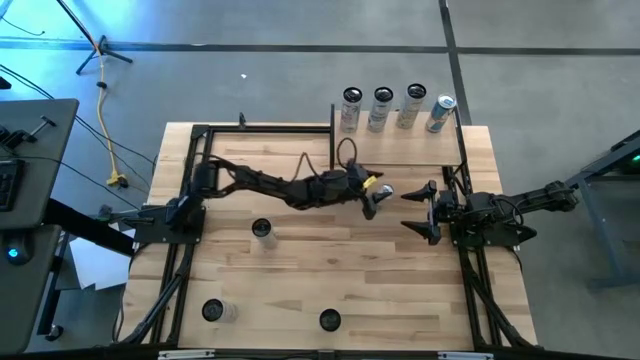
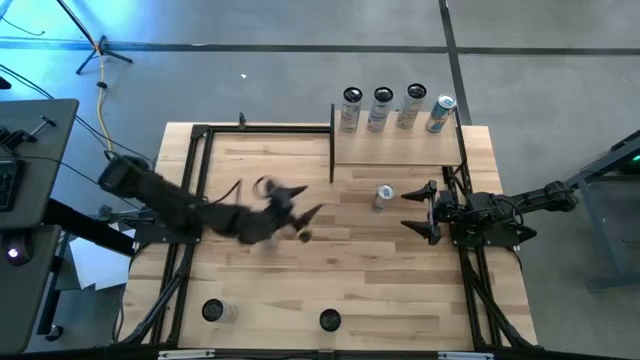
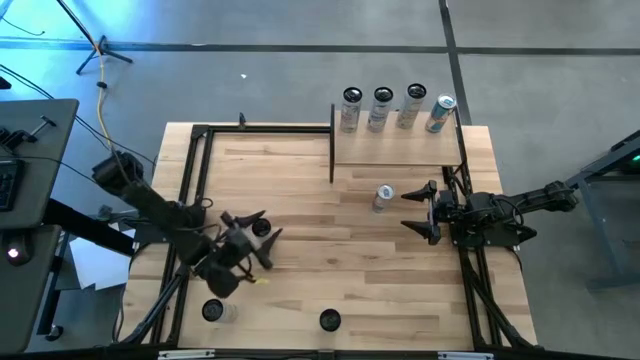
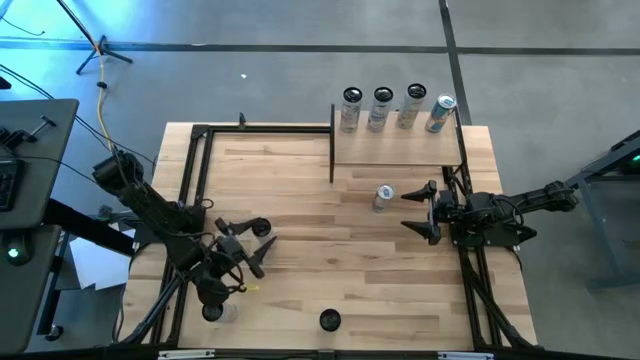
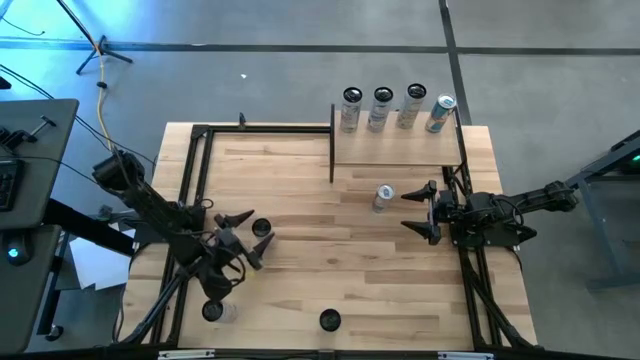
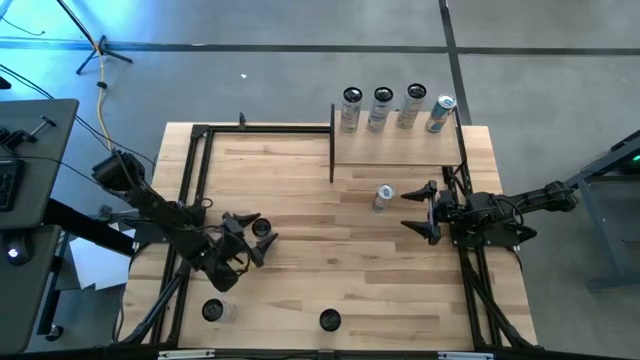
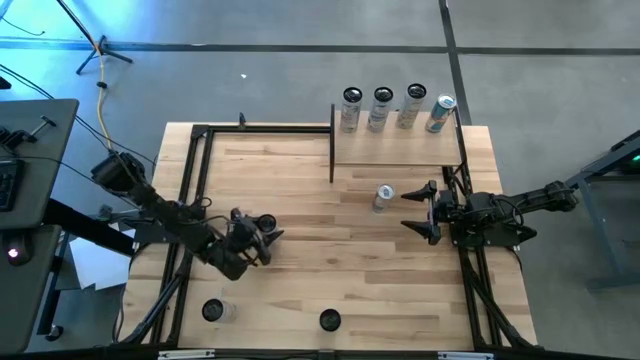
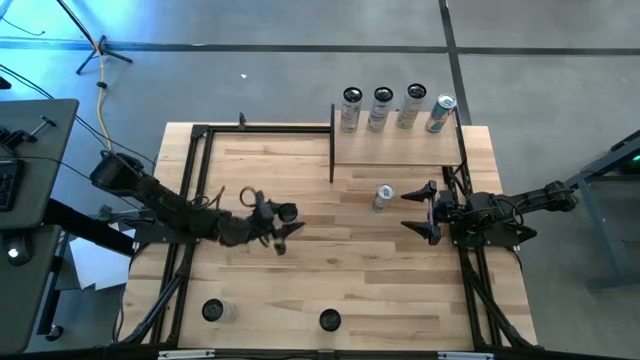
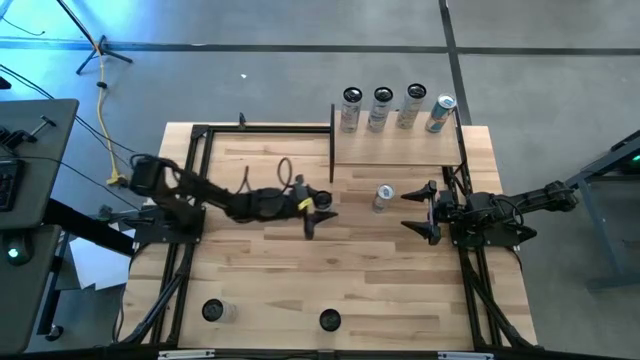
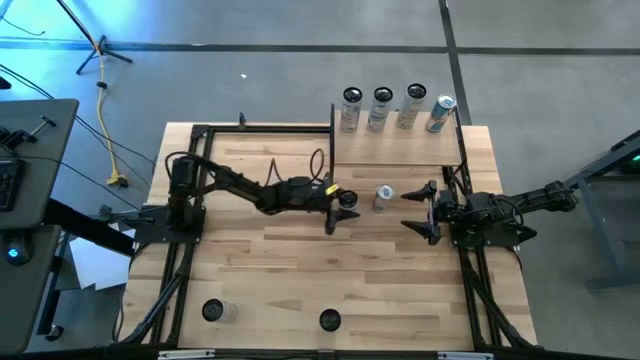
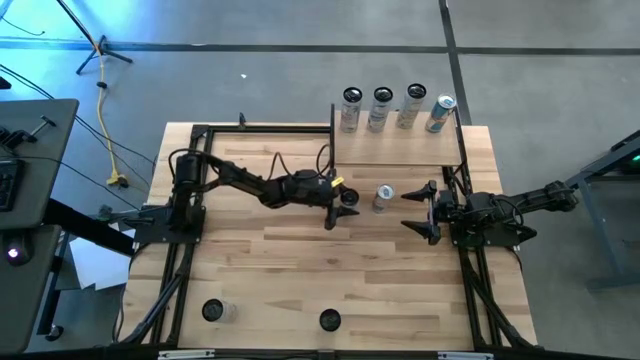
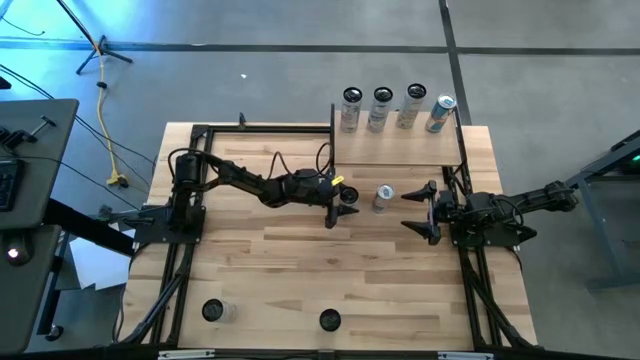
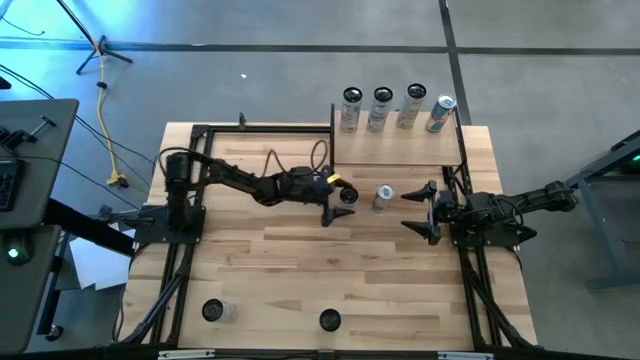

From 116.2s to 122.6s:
Task: Place canned beverage on shelf
Move the white yellow soda can to the center of the table

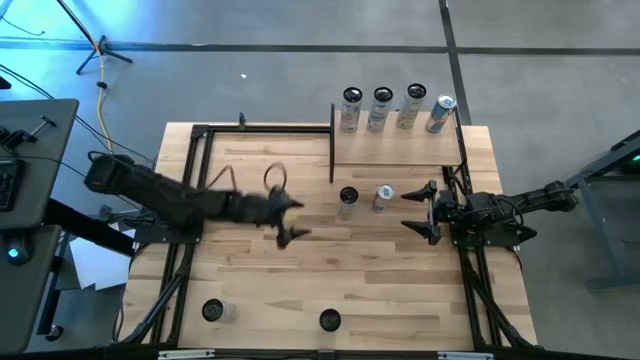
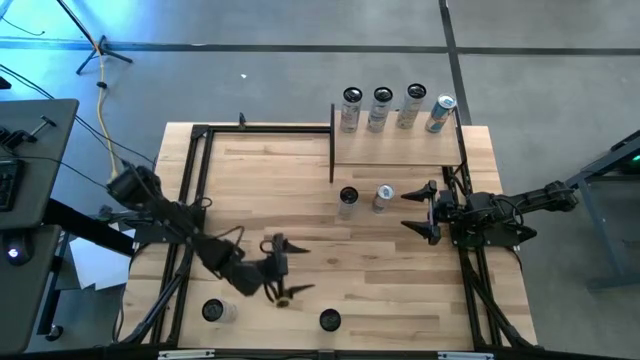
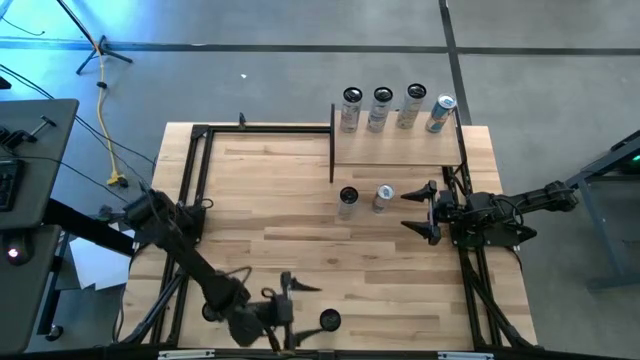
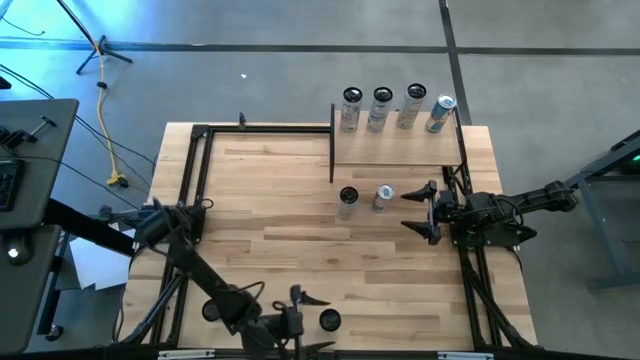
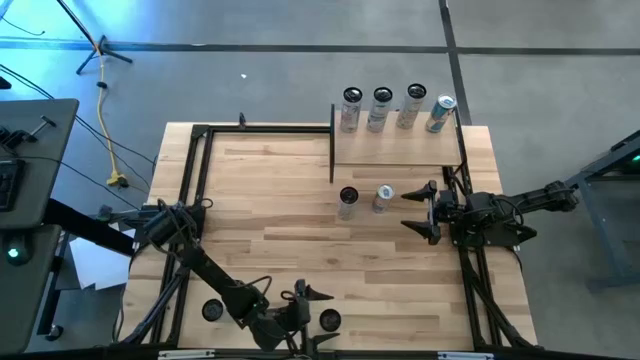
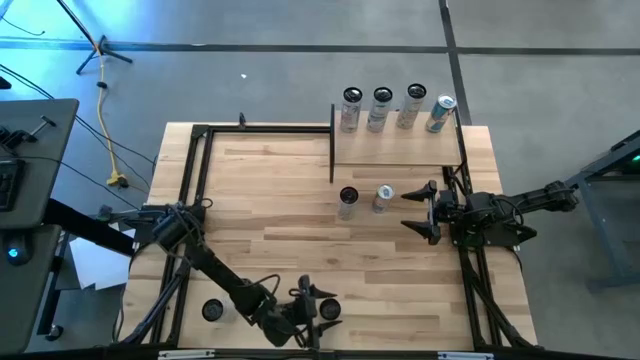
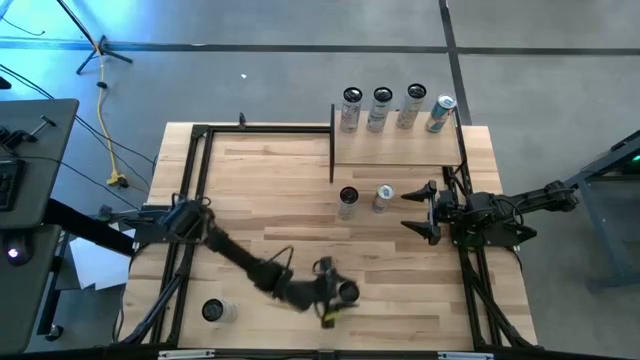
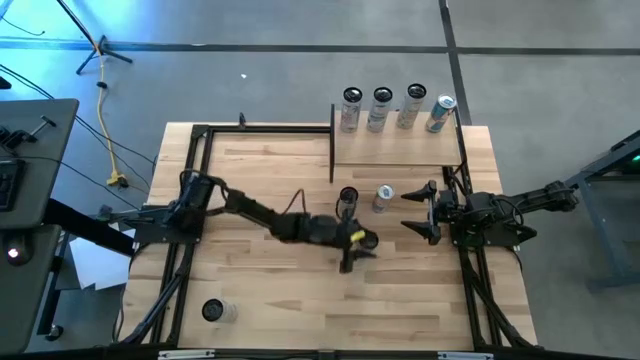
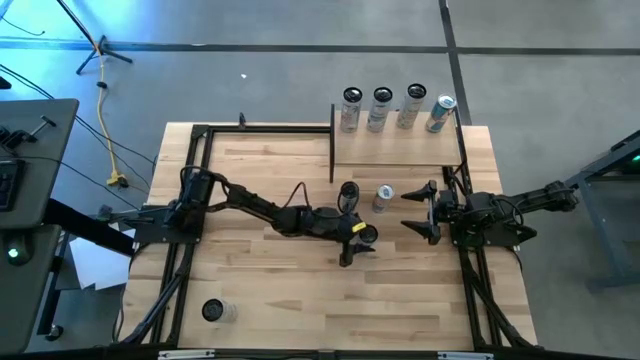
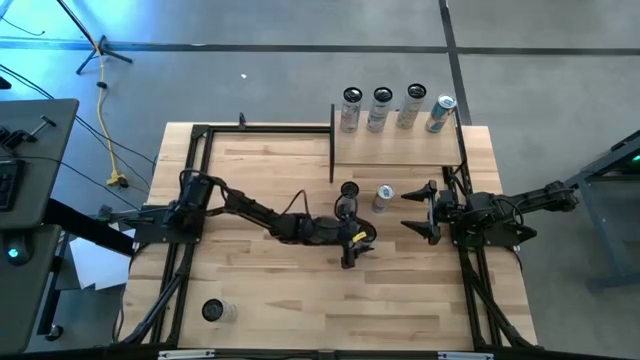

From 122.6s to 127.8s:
Move the white blue soda can to the center of the table

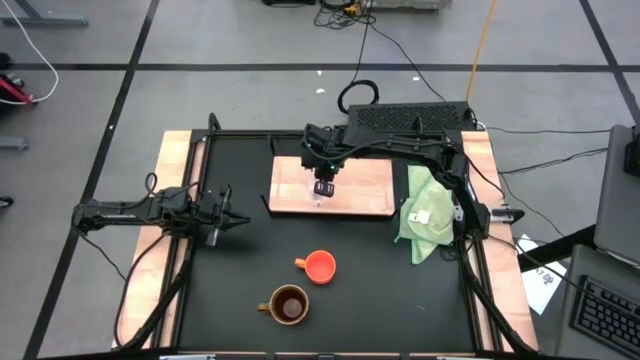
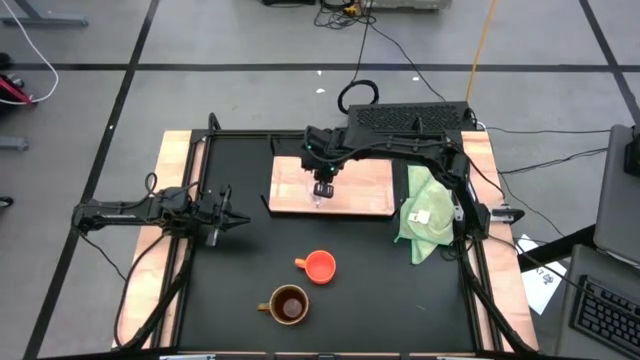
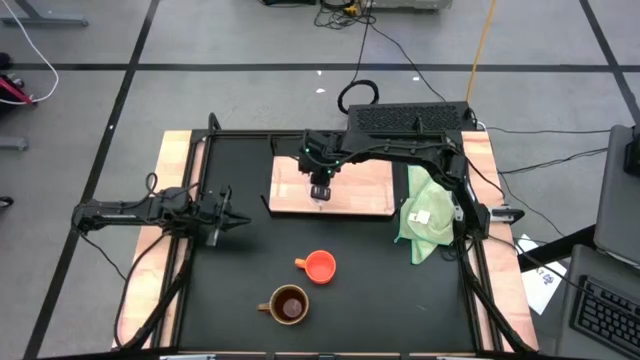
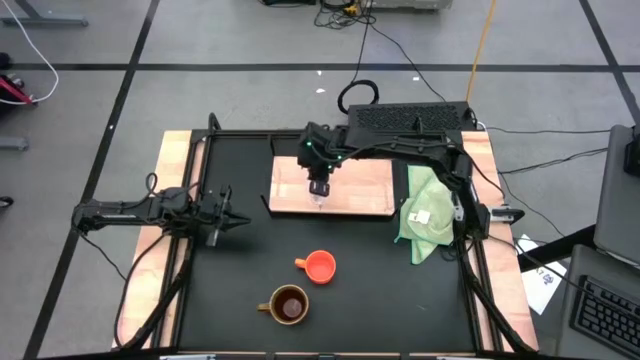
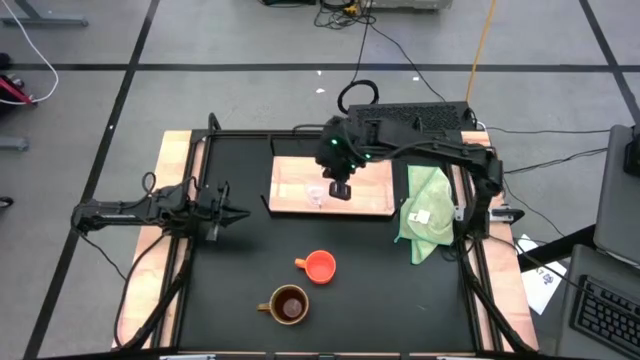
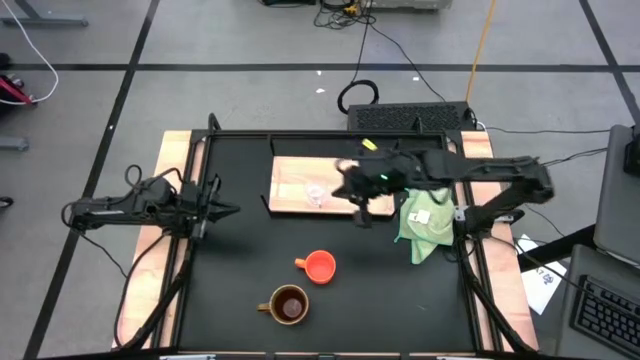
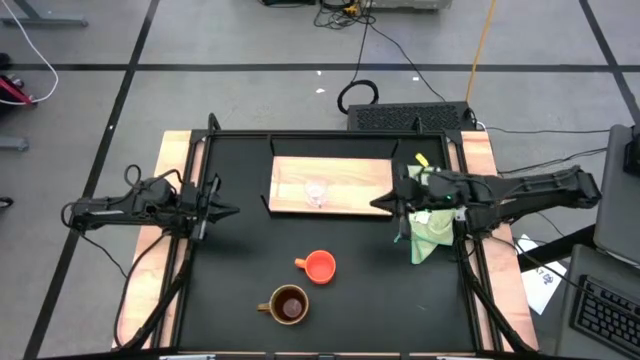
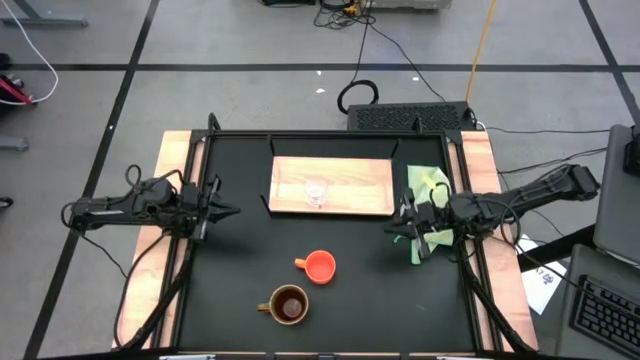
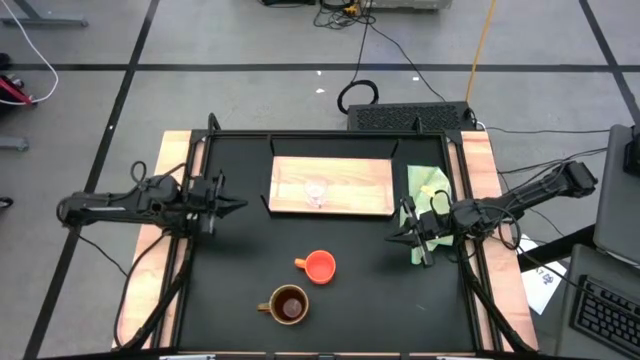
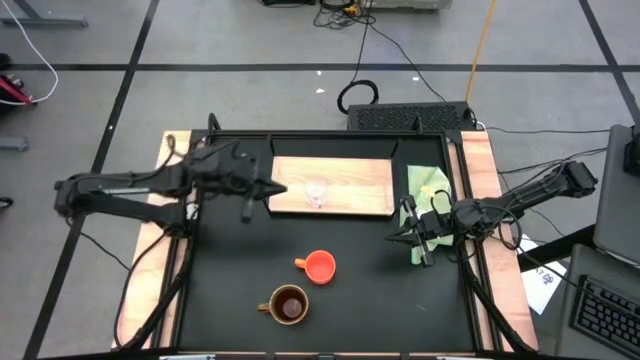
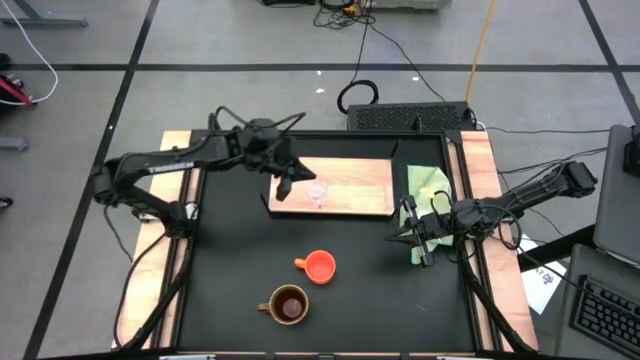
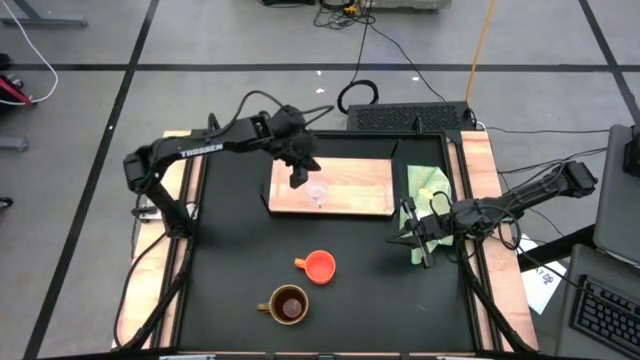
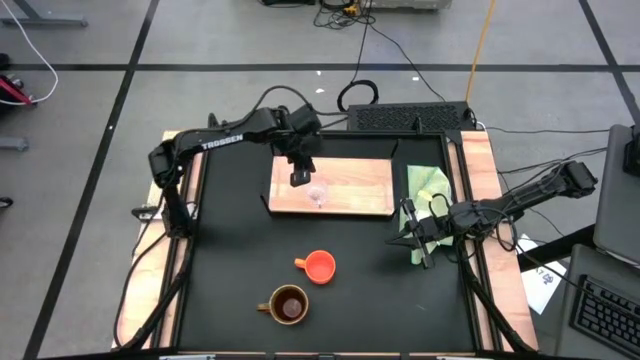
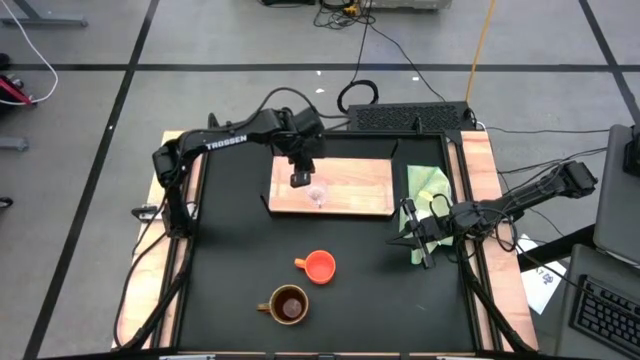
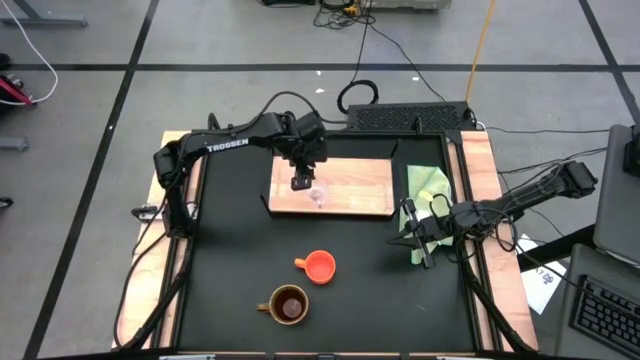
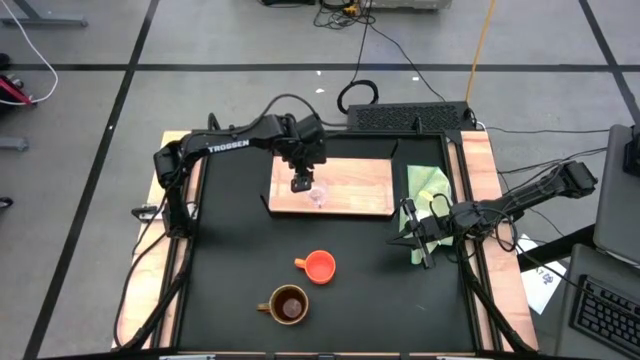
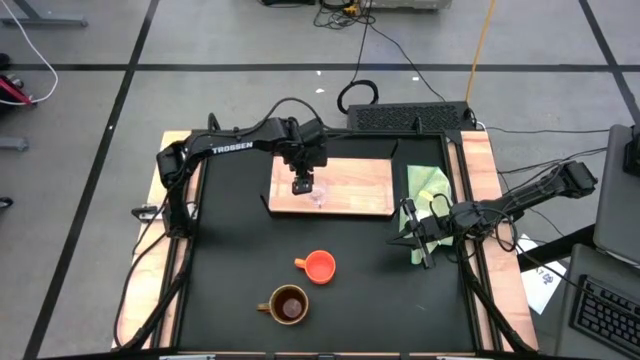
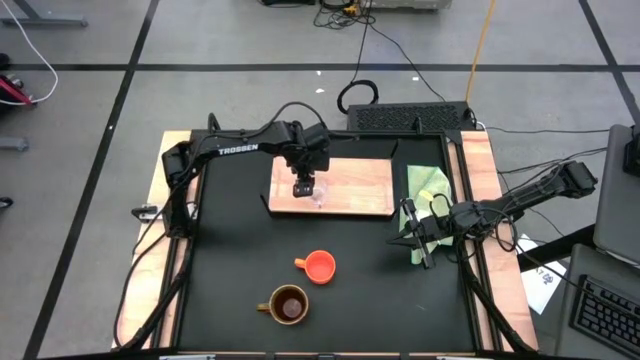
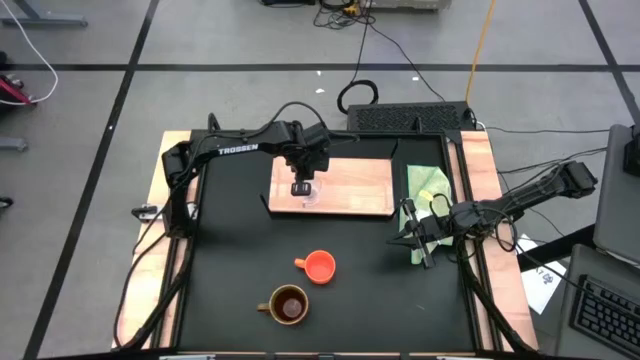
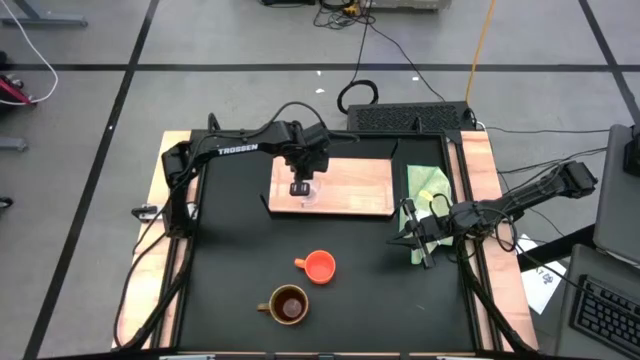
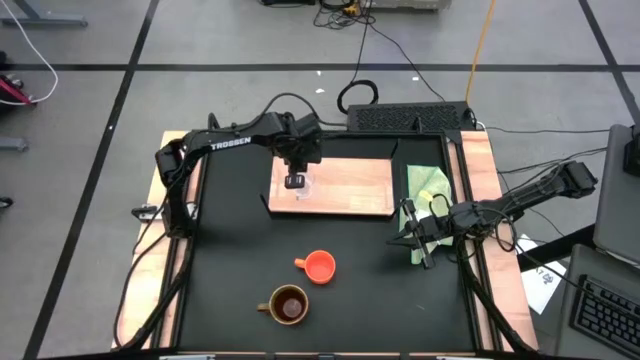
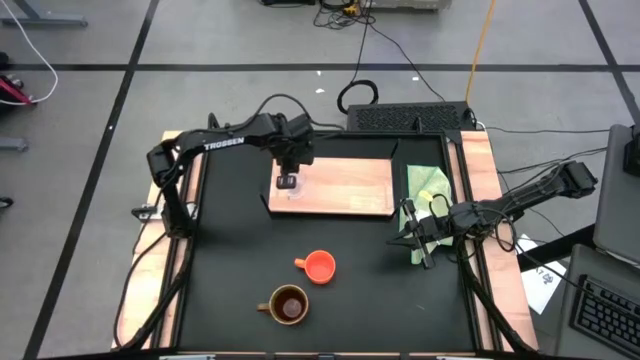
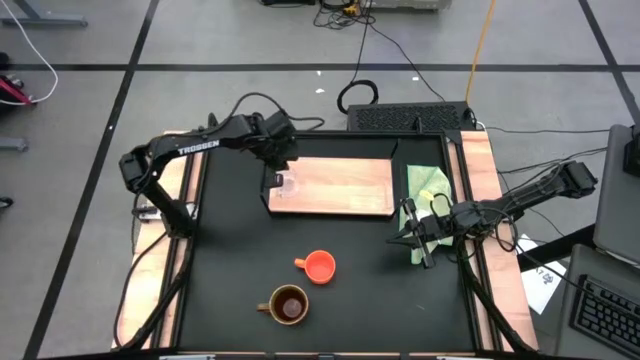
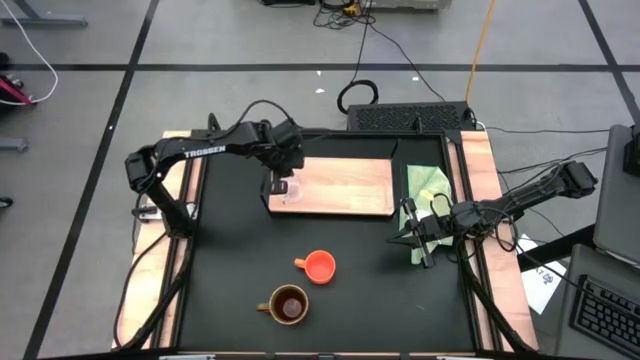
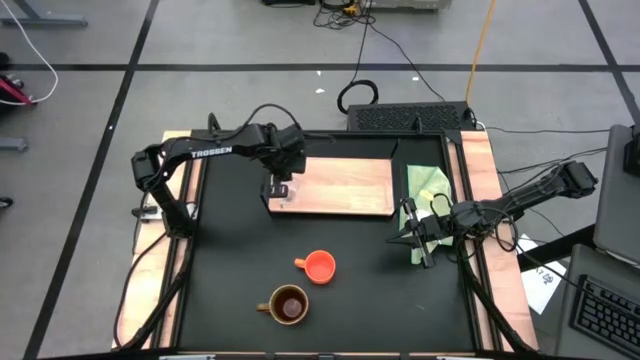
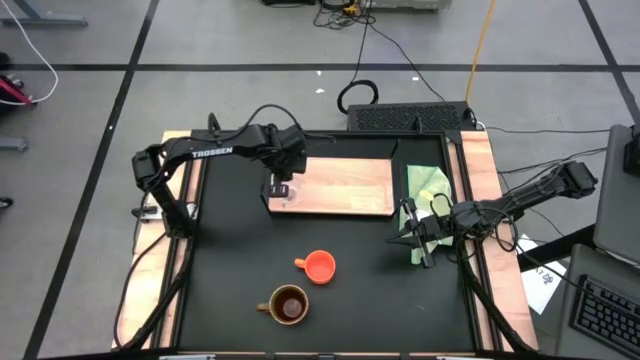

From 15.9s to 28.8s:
Task: Stack small to large cups/mugs on shelf
Put the transparent mug on the shelf
